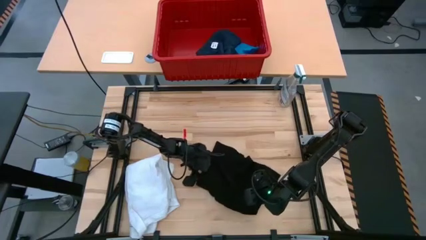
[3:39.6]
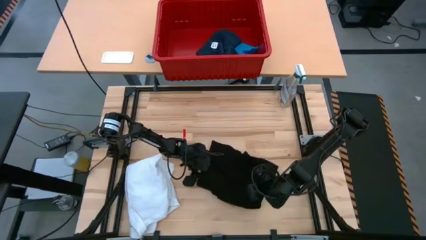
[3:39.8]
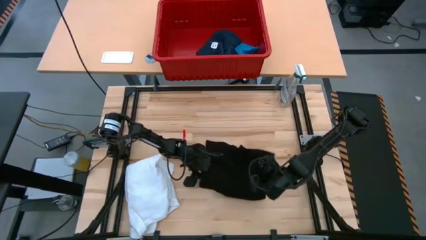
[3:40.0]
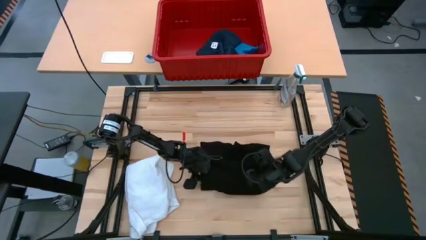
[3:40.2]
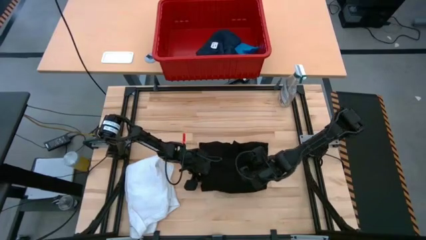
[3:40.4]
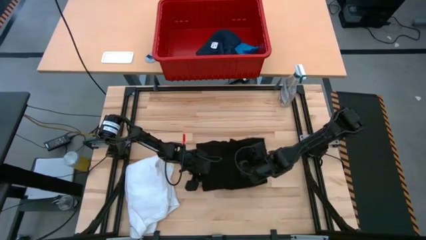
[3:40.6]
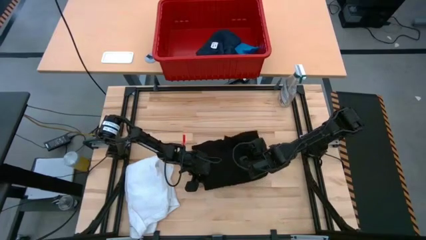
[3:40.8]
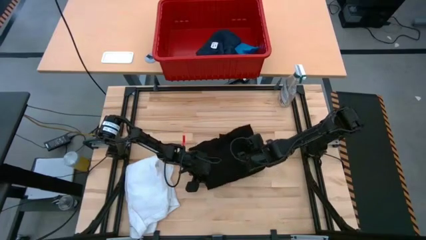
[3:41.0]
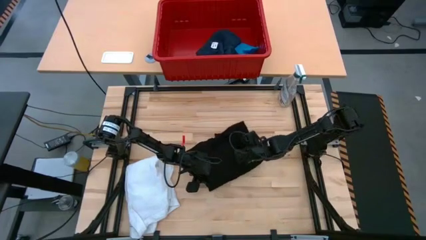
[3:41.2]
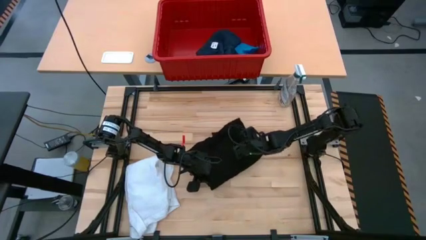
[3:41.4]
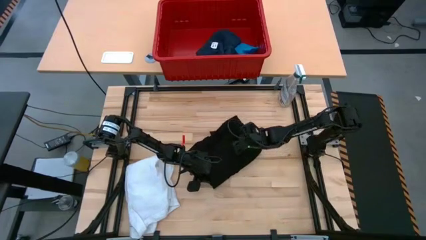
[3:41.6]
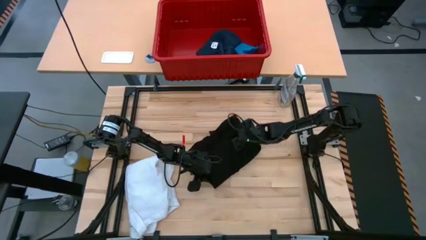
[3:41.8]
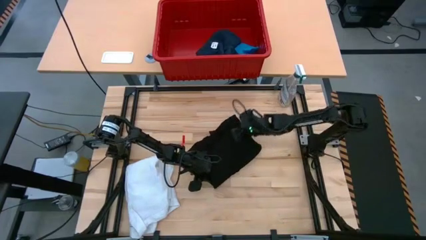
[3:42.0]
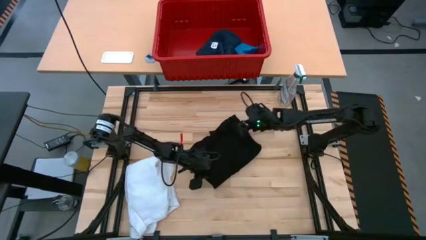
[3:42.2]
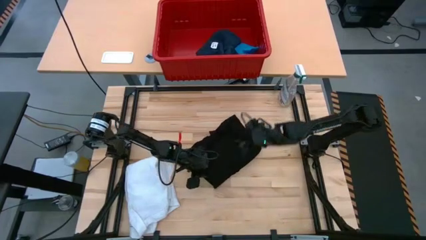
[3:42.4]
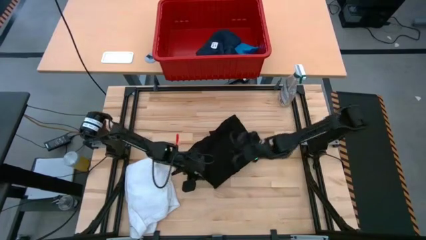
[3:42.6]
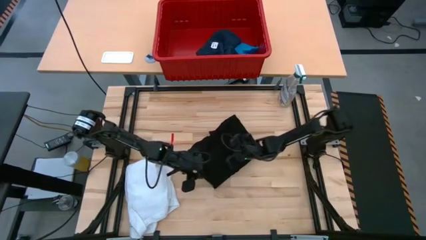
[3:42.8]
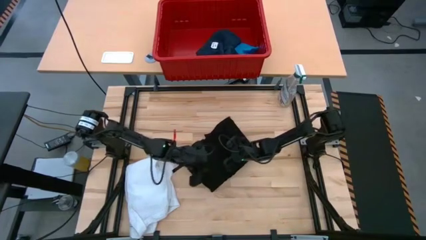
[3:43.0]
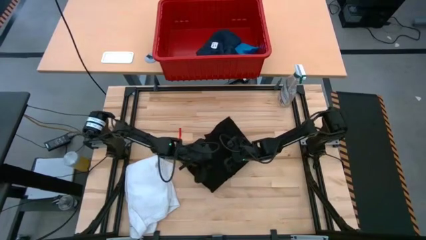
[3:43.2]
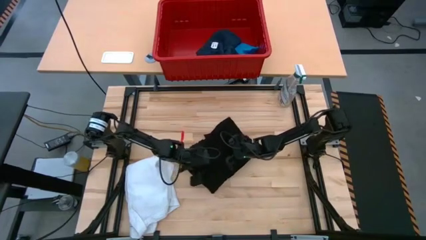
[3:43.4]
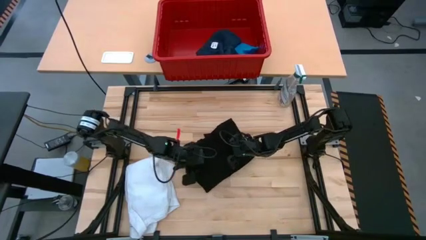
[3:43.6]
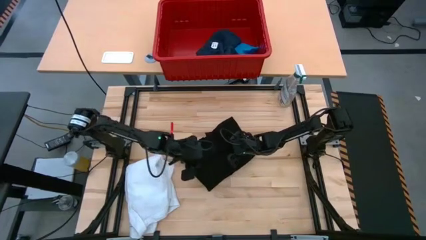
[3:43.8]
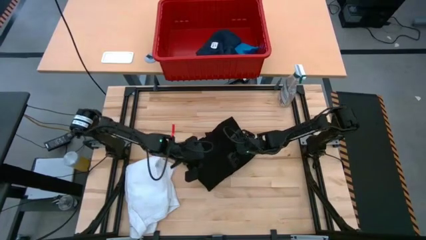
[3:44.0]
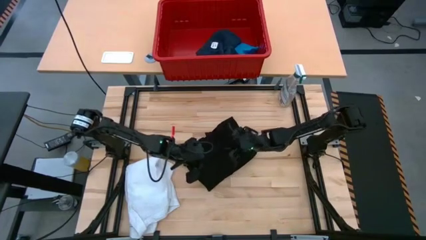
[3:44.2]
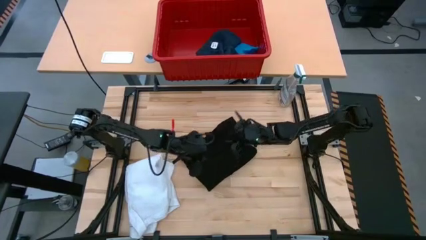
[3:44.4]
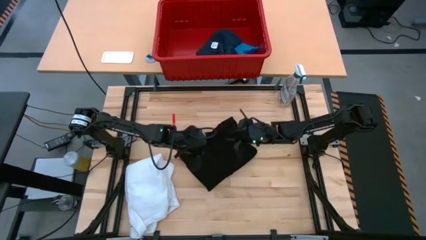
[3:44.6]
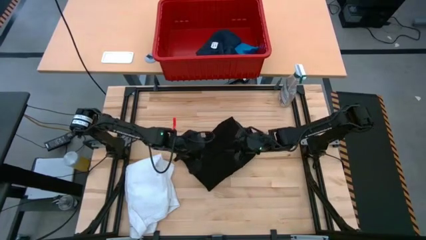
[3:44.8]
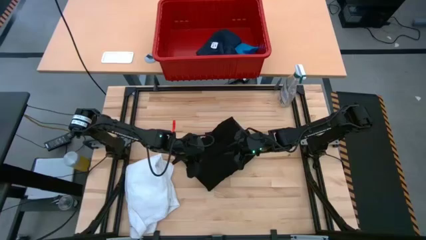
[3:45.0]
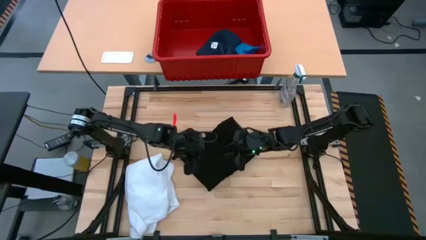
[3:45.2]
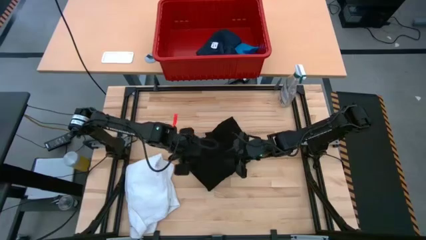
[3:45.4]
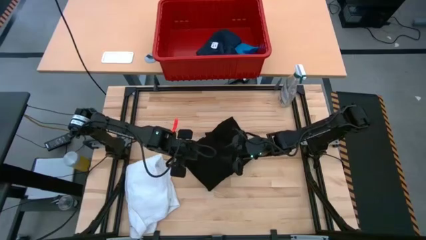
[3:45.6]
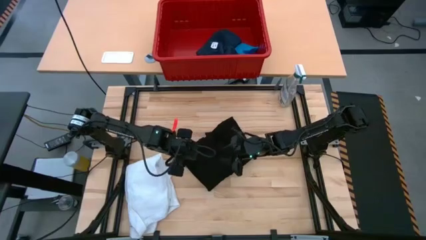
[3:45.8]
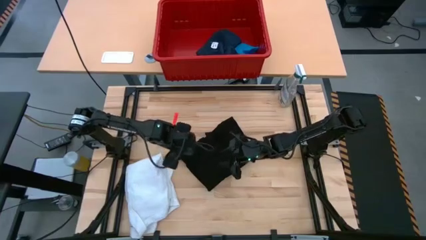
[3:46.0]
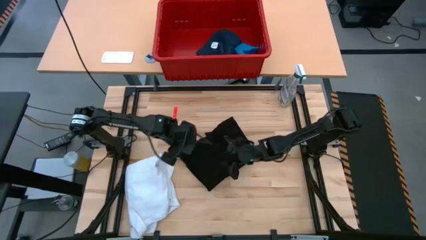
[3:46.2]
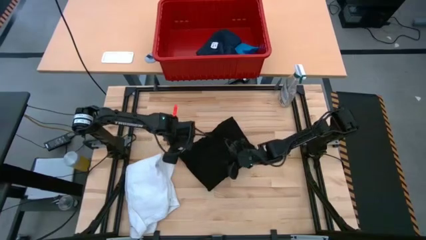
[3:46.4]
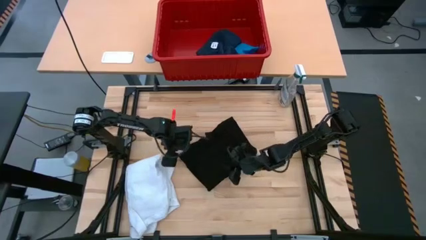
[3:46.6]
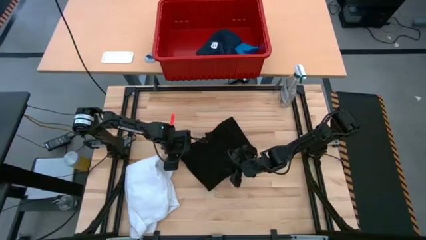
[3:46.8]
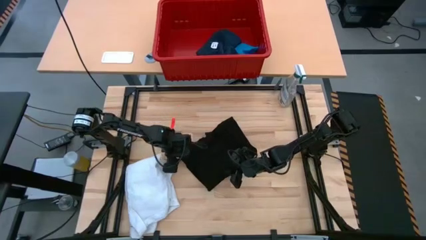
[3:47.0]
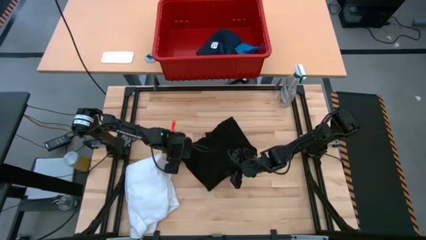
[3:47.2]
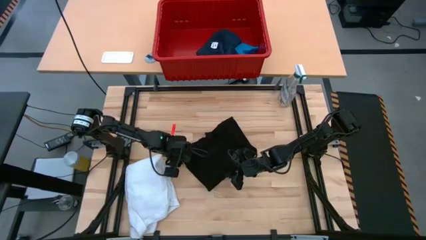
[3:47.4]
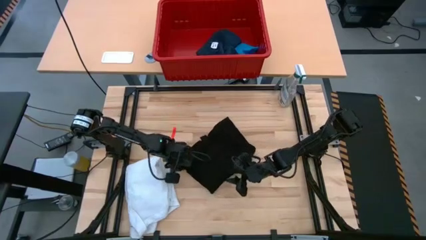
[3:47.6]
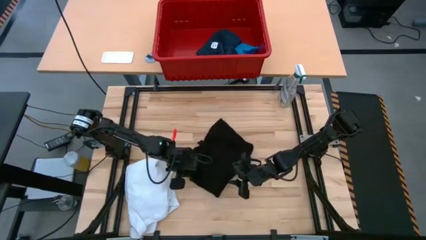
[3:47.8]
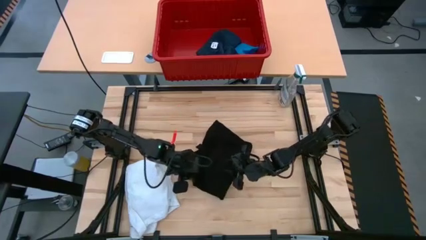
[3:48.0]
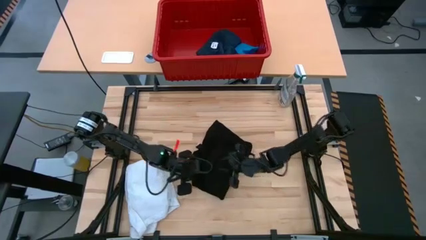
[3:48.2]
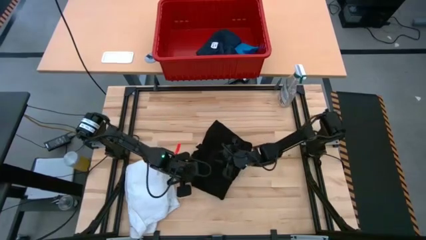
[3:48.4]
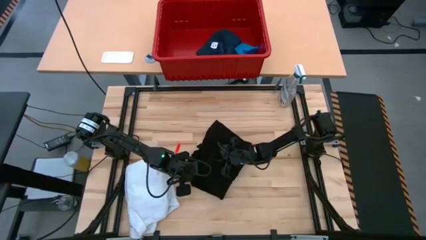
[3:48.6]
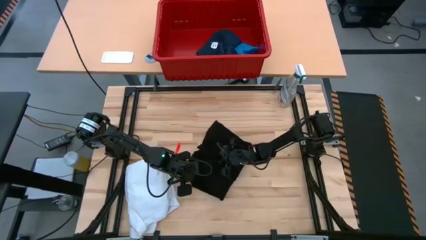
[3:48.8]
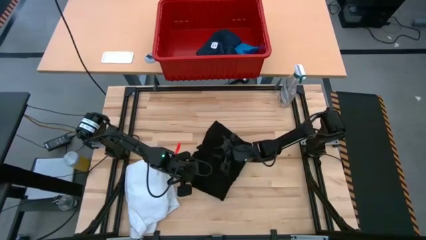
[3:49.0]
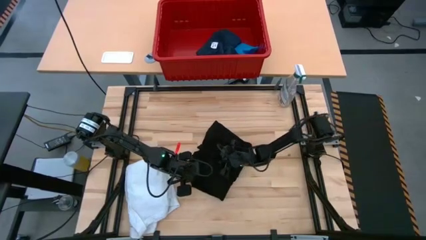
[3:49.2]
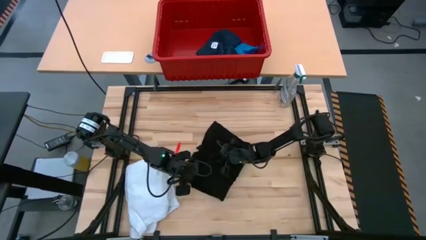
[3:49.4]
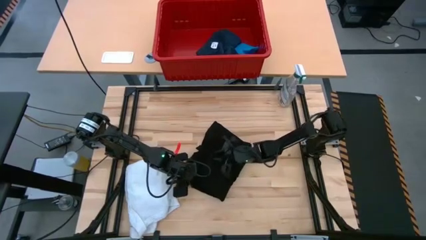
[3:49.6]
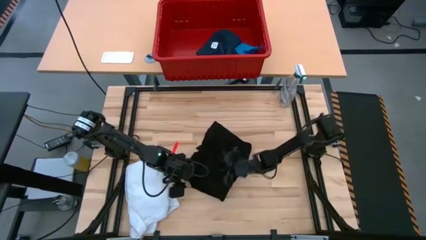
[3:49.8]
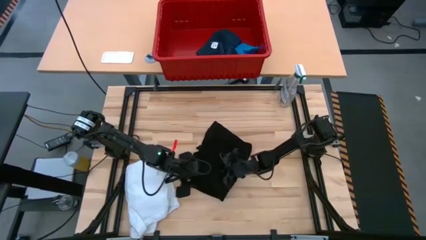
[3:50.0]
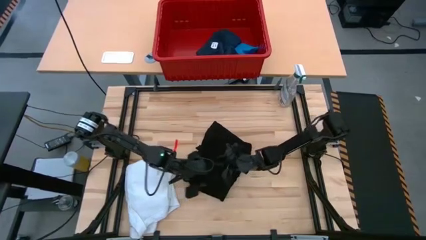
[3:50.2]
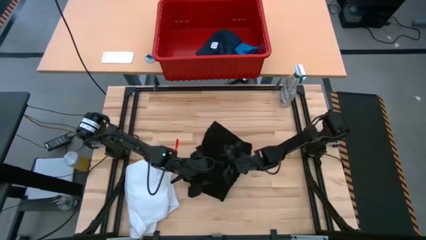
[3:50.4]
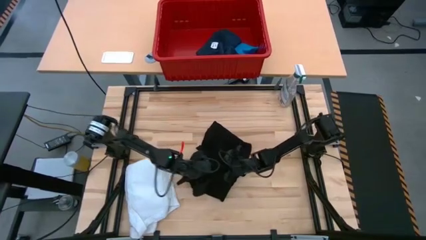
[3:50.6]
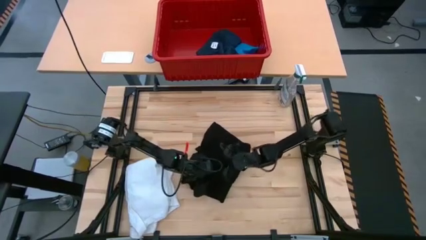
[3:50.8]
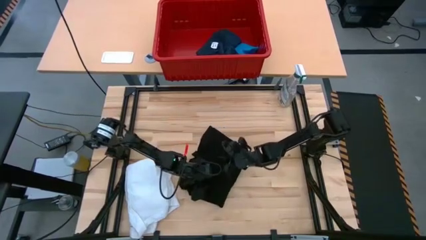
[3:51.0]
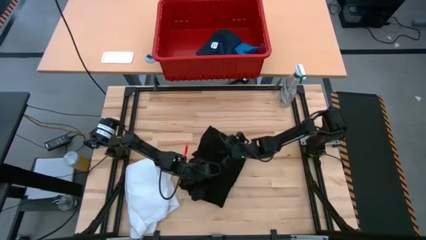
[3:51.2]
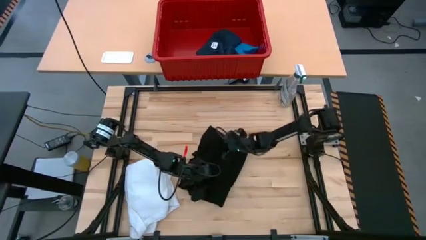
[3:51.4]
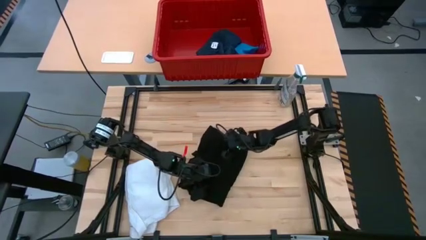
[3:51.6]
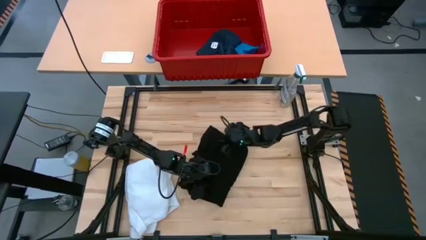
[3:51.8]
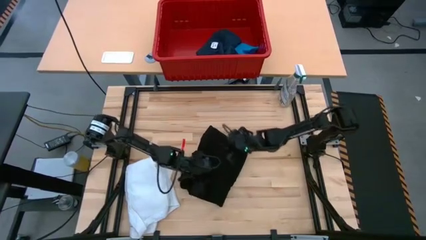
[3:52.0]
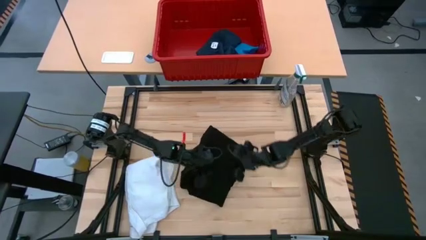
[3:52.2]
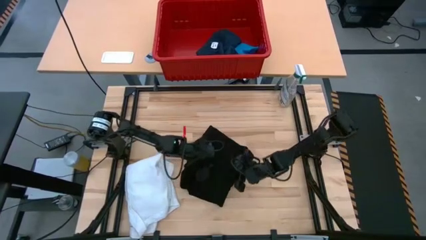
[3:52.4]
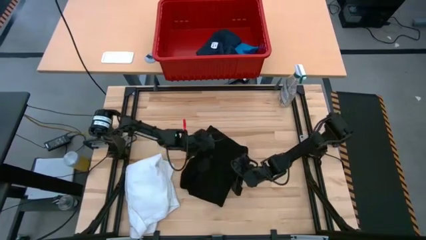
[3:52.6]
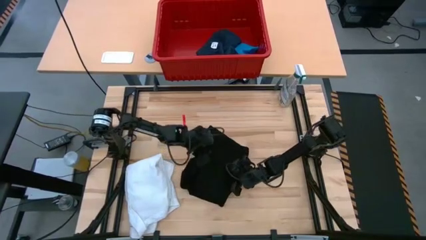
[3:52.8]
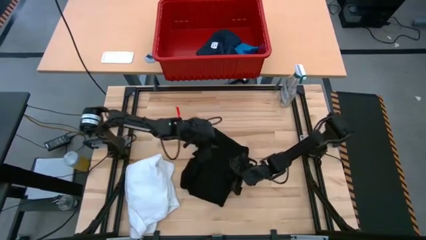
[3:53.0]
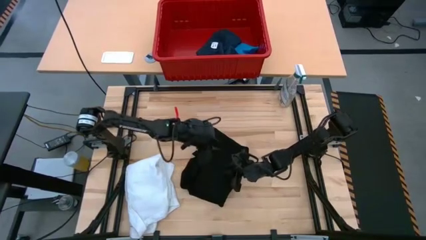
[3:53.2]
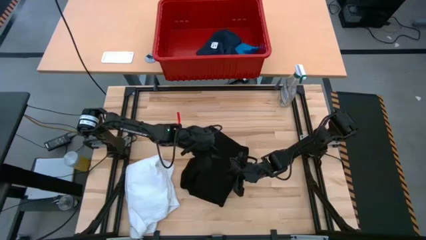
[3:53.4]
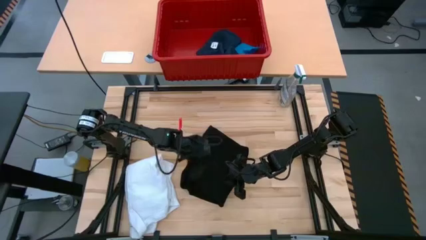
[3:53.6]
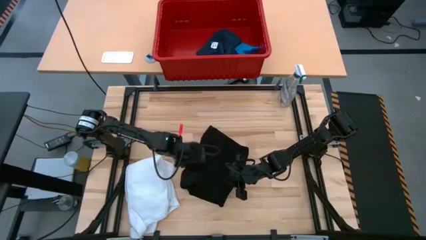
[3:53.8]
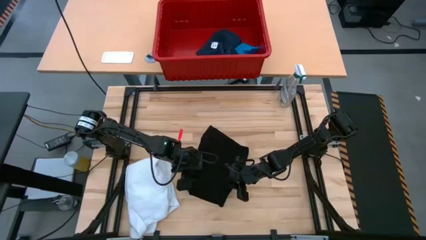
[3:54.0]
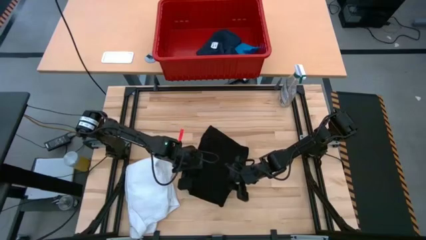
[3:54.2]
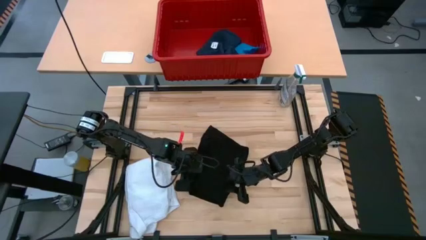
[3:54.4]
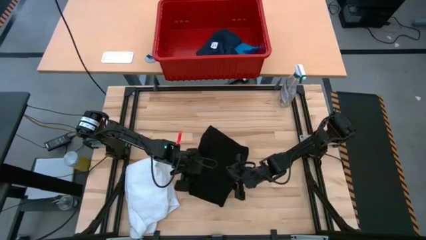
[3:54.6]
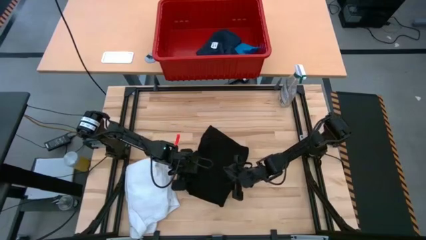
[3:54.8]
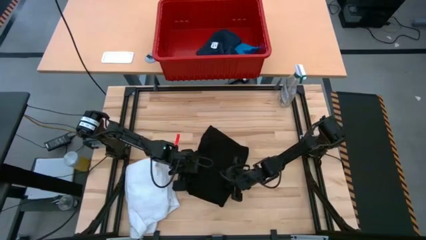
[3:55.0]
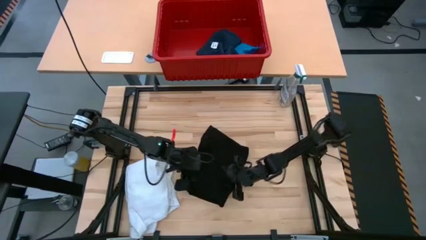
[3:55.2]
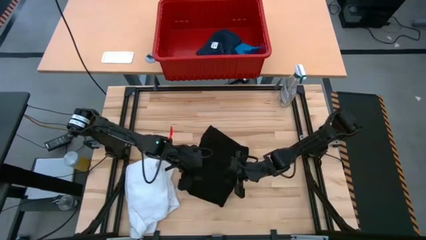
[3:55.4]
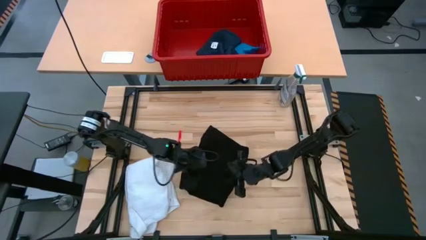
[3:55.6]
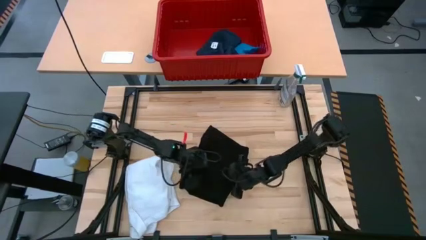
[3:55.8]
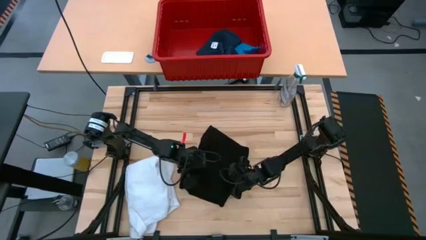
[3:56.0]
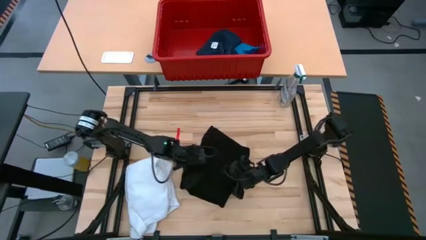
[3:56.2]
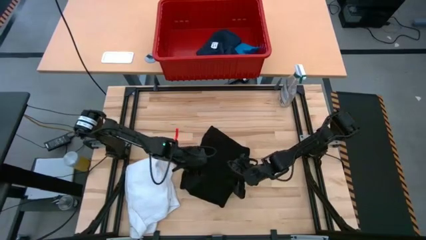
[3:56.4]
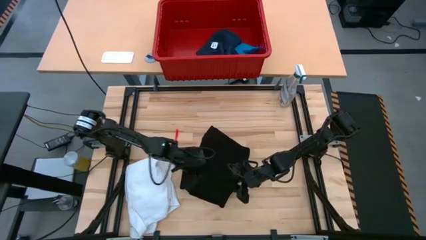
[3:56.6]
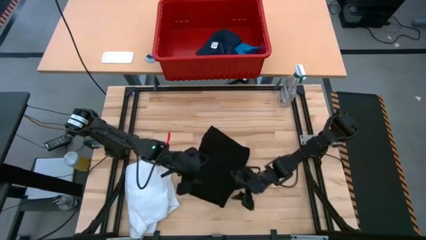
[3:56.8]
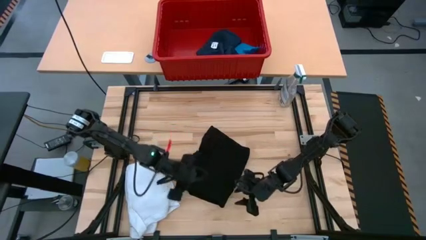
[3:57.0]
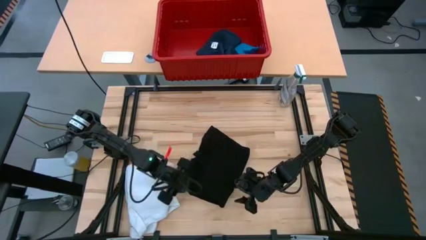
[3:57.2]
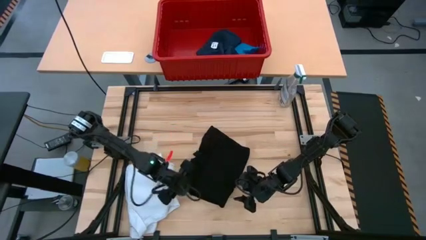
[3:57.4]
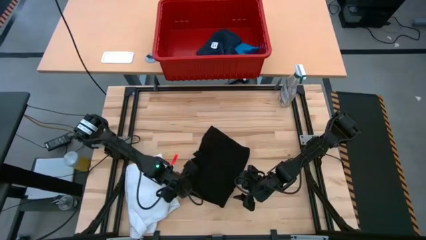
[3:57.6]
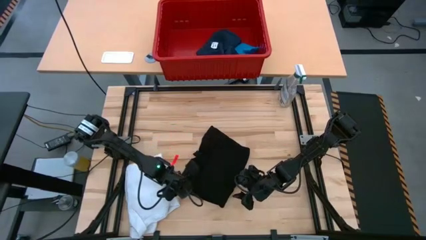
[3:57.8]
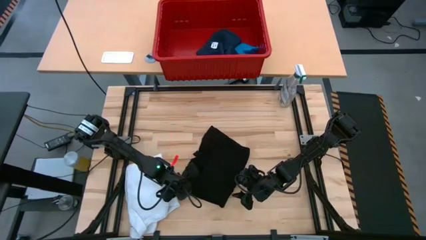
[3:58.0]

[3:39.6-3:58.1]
Task: Fold Laundry from Bin
Fold the black shirt
